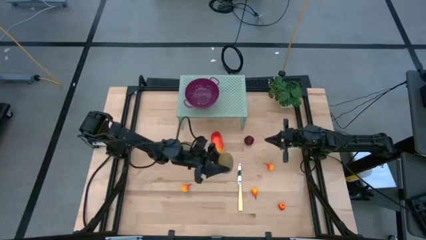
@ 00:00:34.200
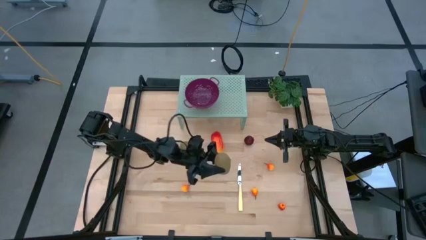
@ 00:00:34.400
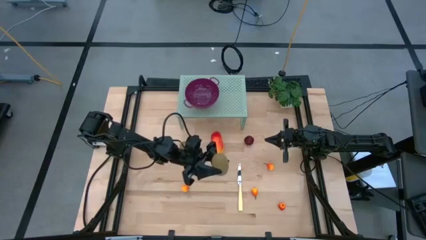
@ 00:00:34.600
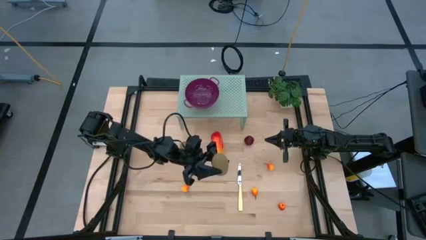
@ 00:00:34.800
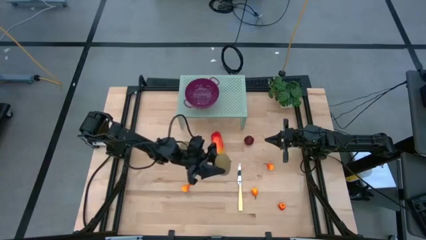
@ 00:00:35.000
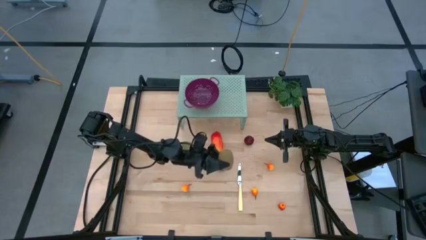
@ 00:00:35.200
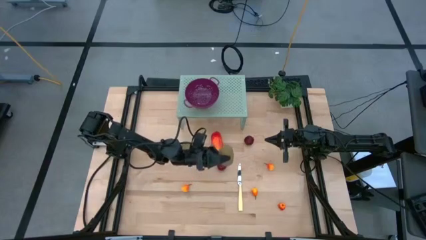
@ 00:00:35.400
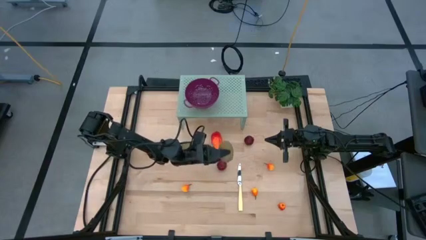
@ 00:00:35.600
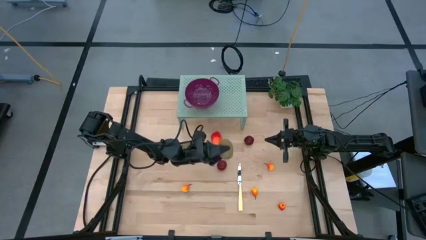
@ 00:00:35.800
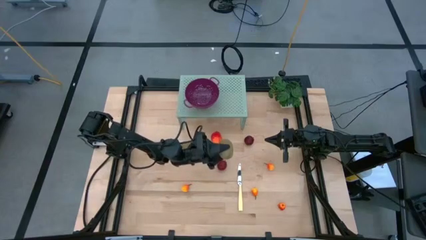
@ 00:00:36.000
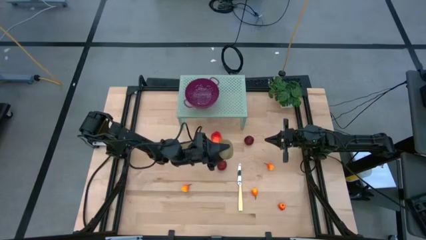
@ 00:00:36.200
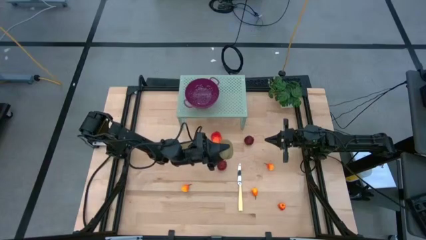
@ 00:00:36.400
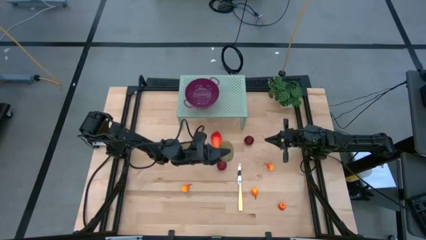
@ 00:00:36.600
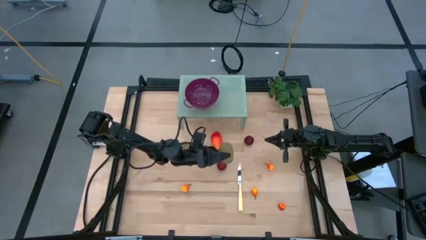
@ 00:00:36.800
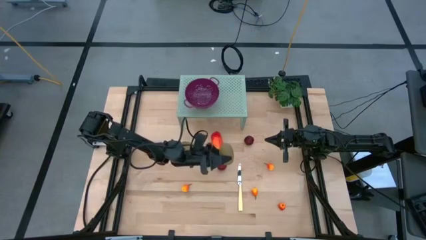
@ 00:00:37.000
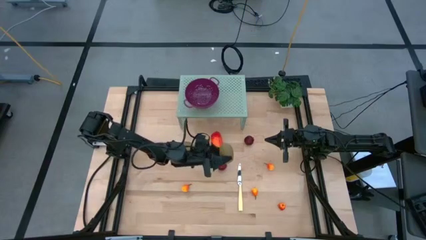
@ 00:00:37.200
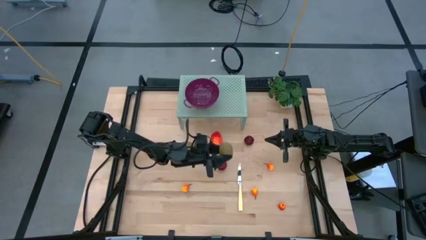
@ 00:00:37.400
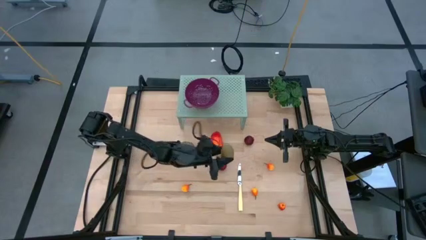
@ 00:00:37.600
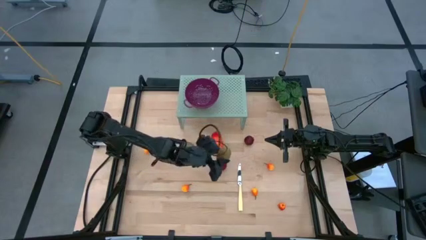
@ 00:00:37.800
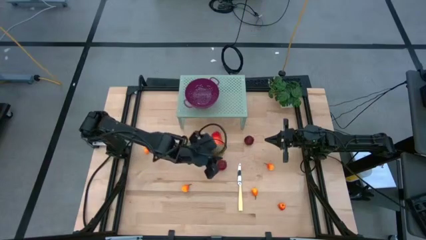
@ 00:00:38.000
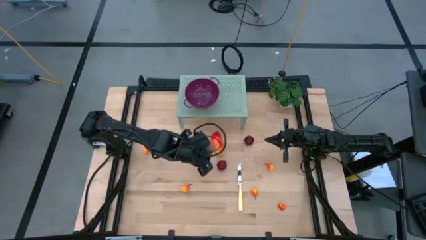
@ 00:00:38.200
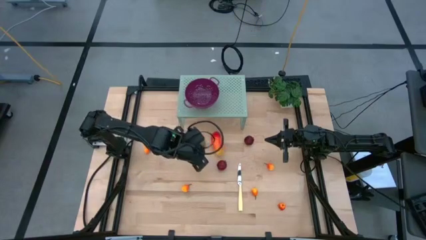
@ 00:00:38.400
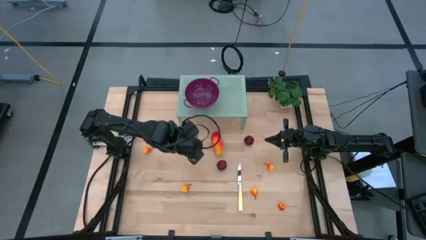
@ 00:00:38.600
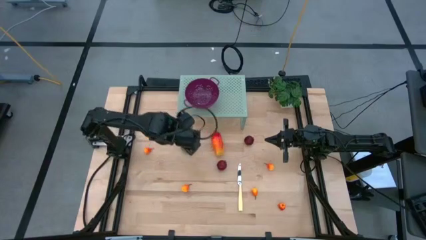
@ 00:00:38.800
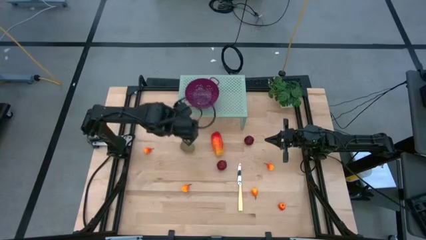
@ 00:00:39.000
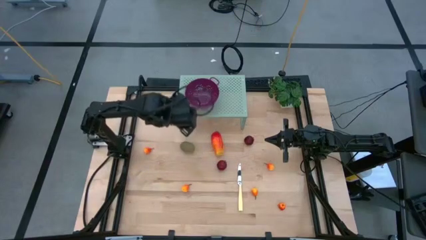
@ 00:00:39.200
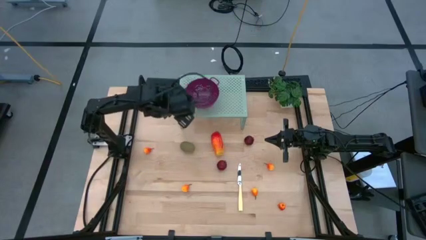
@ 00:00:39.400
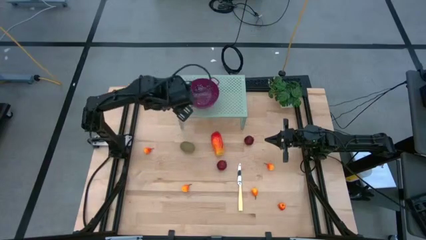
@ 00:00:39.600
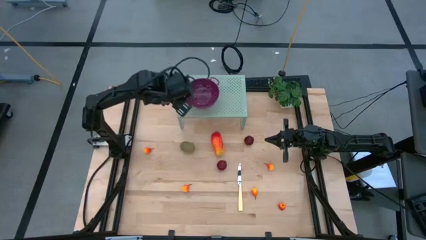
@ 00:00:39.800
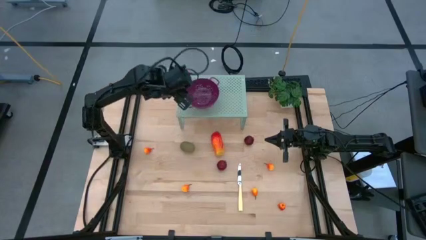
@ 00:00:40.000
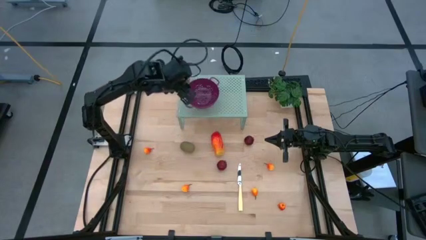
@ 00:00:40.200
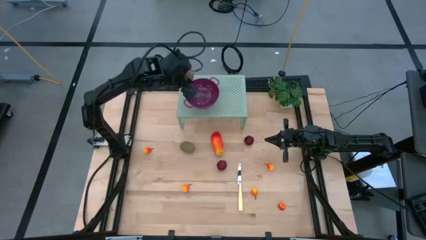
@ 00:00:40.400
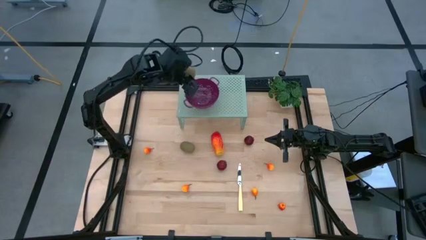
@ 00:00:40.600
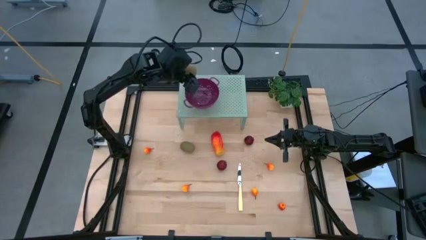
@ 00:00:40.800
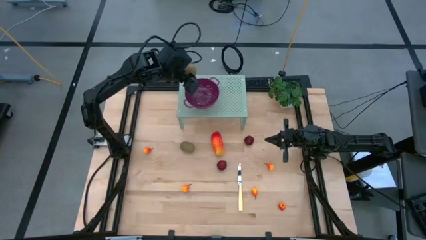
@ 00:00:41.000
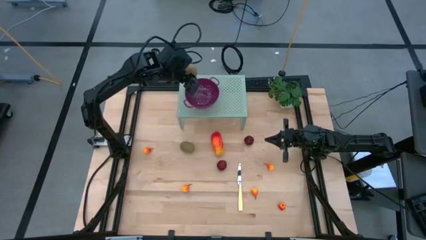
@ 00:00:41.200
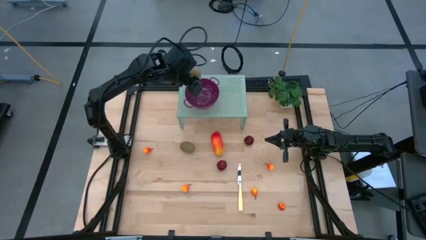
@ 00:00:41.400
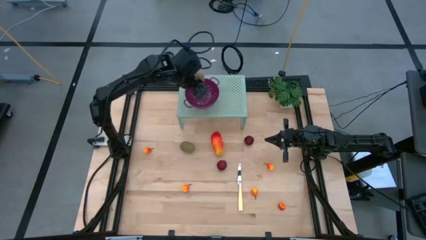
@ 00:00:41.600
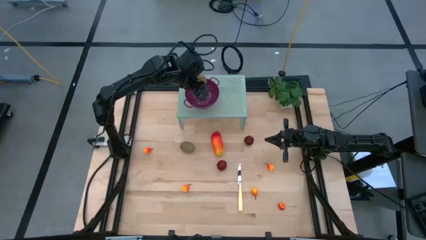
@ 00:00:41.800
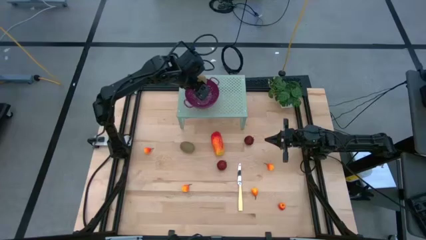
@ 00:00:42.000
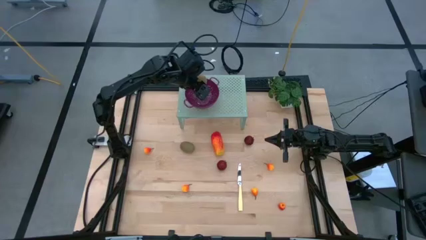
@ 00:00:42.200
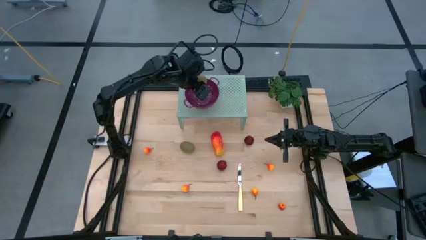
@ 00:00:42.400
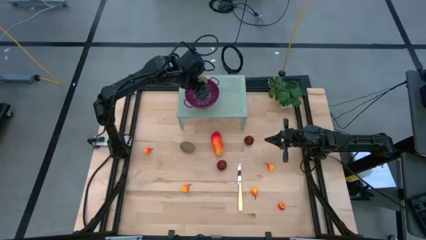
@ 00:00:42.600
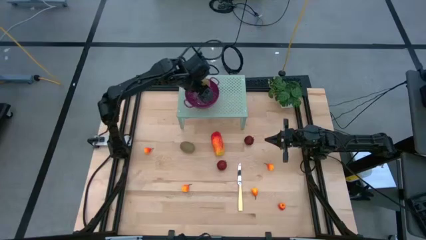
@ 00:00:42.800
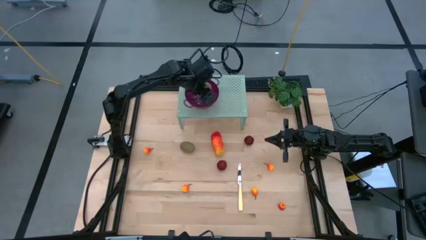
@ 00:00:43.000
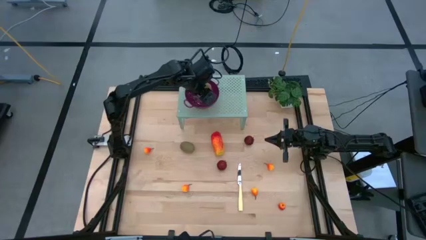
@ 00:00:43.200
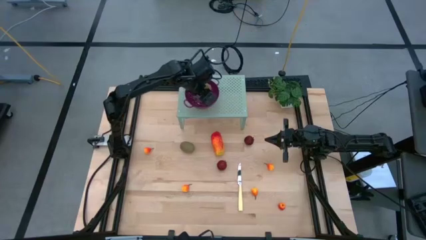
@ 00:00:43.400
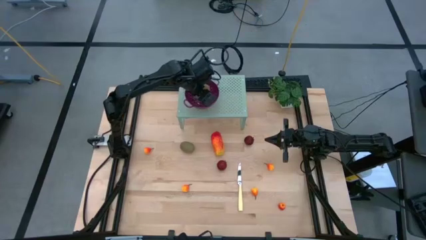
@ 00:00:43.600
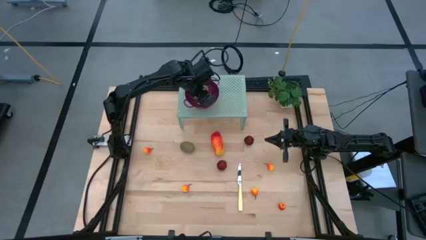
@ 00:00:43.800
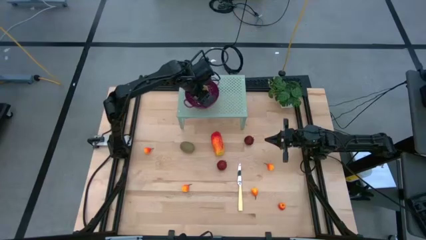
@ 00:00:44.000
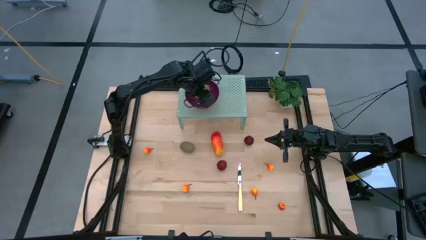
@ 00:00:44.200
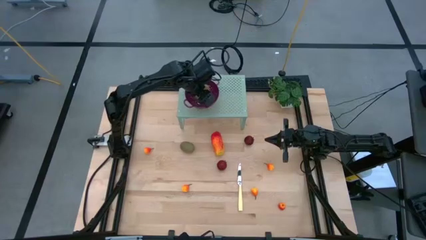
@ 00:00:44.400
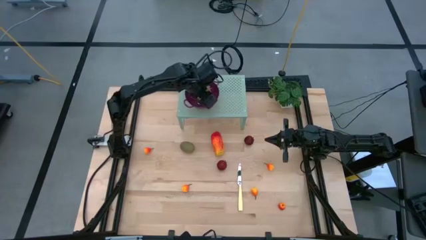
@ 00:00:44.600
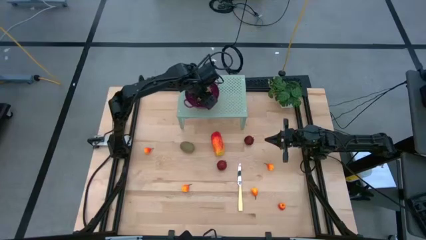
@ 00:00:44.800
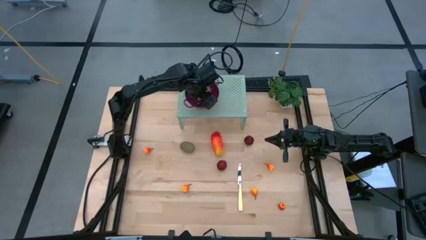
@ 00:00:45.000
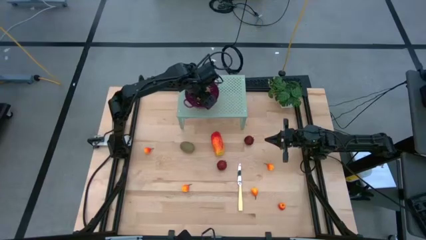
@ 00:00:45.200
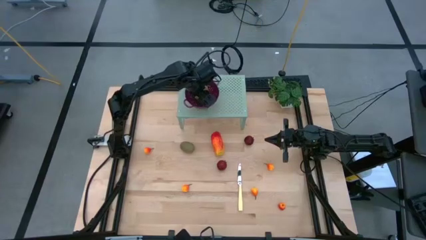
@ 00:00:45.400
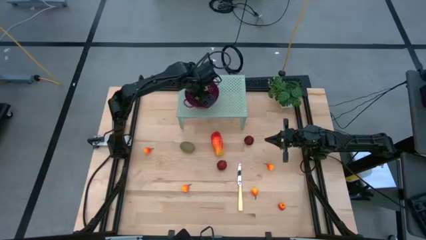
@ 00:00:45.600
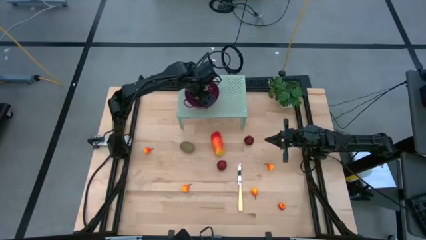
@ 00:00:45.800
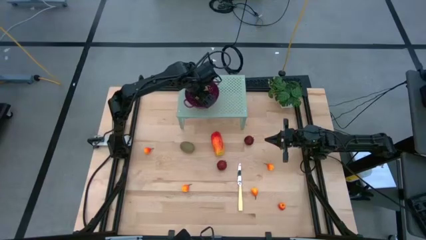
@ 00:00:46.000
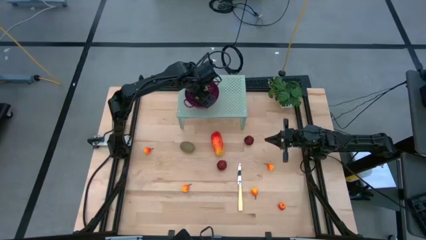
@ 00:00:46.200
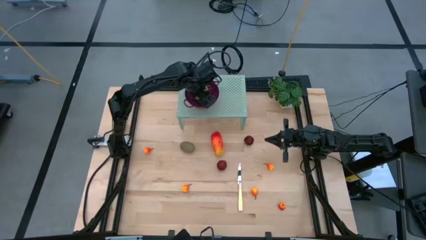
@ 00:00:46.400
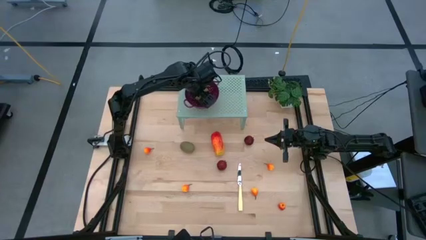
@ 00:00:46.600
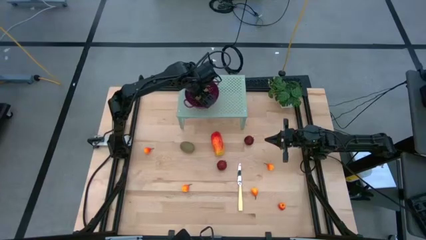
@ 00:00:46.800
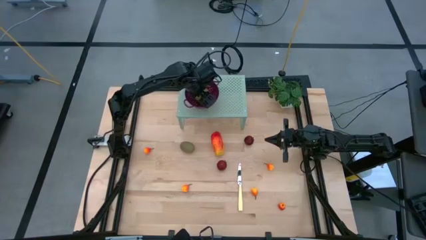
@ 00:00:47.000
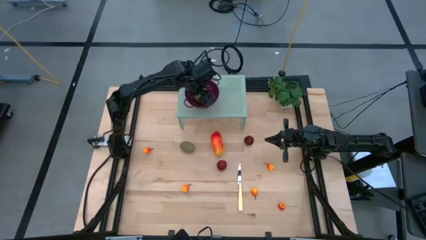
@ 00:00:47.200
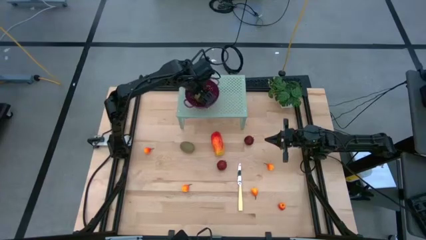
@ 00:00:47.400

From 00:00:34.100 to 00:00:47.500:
Task: Pick & Place Fruit
Put the kiwi into violet strainer bowl on the shelf
